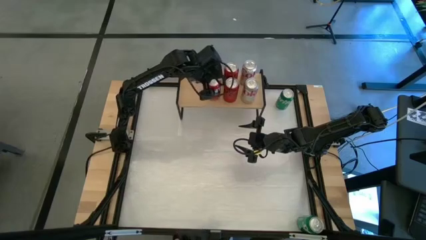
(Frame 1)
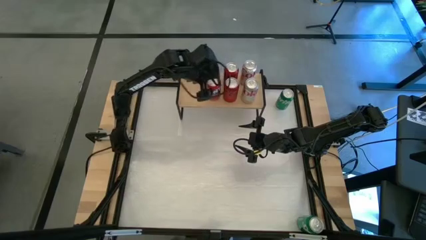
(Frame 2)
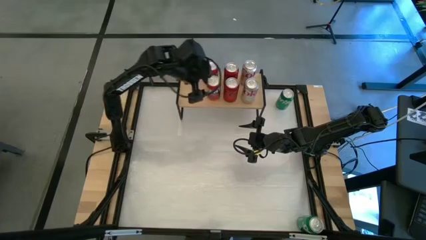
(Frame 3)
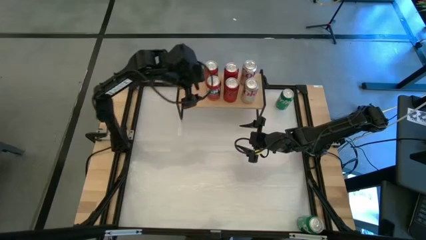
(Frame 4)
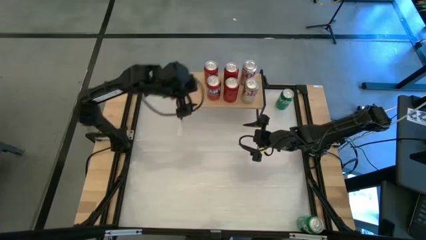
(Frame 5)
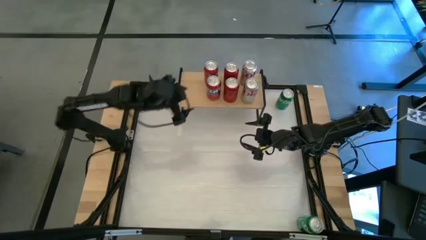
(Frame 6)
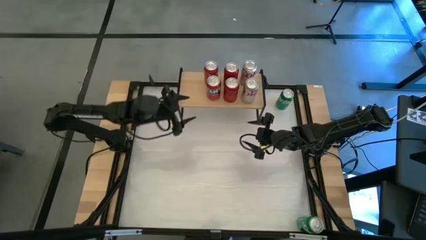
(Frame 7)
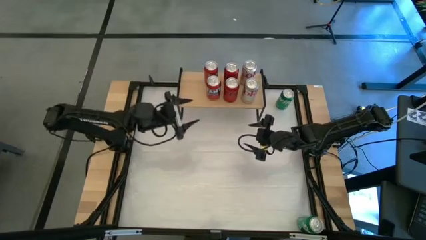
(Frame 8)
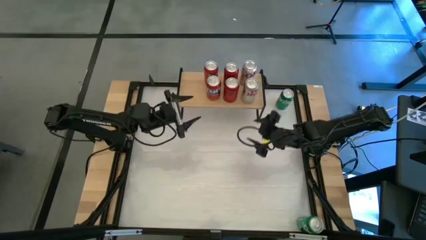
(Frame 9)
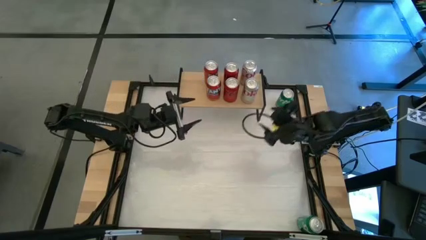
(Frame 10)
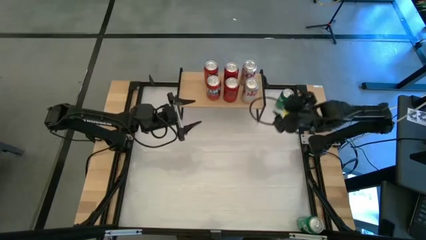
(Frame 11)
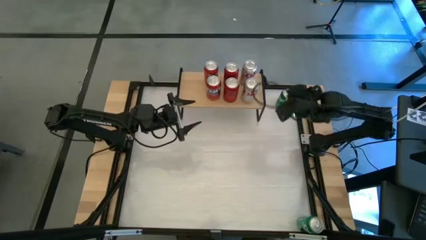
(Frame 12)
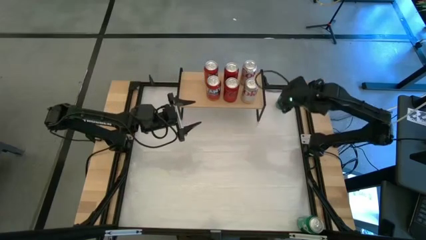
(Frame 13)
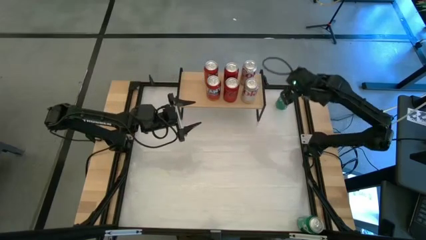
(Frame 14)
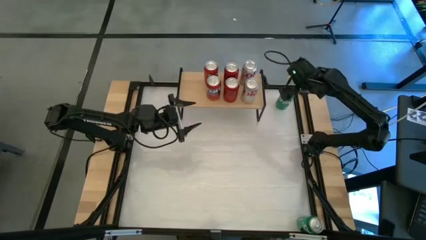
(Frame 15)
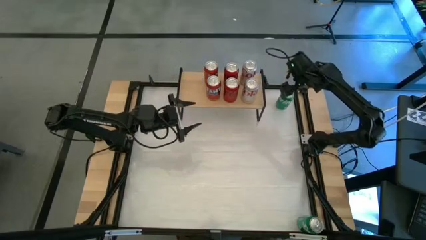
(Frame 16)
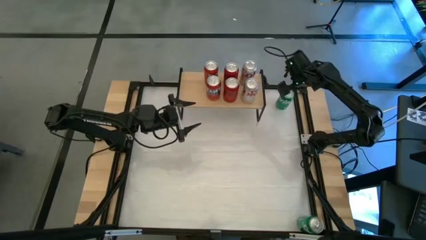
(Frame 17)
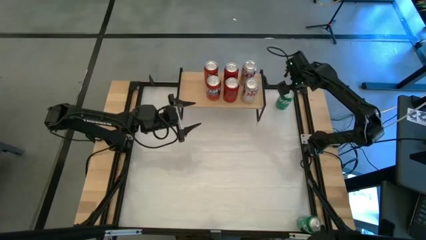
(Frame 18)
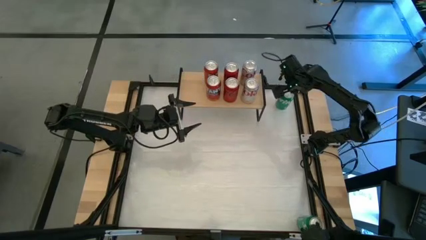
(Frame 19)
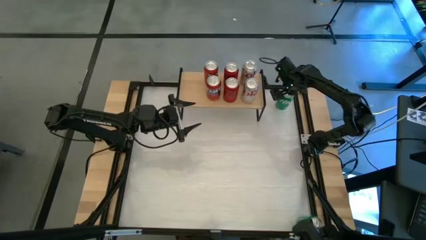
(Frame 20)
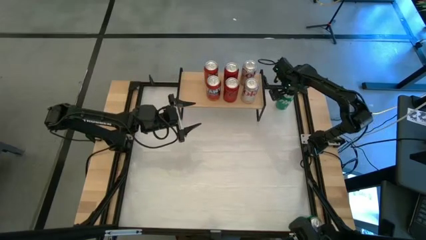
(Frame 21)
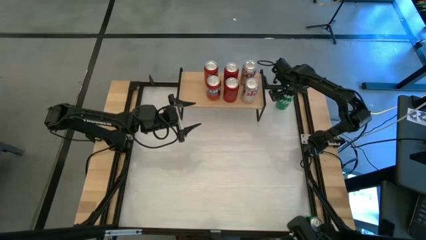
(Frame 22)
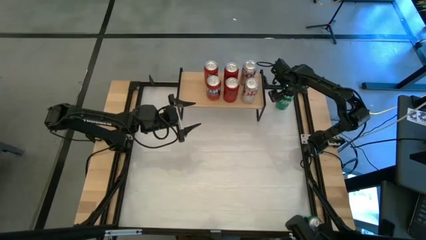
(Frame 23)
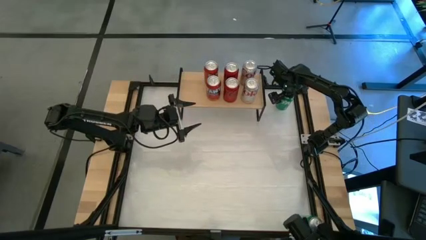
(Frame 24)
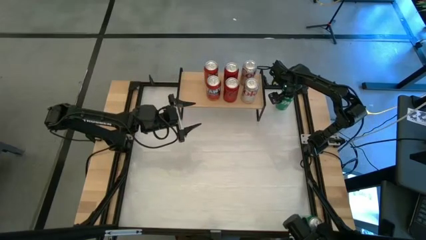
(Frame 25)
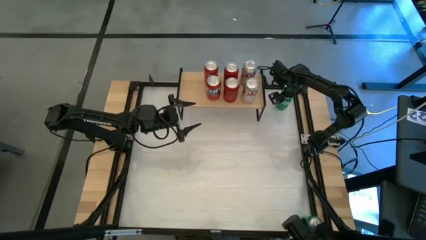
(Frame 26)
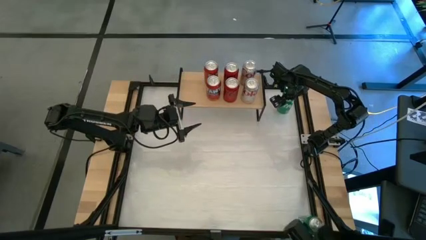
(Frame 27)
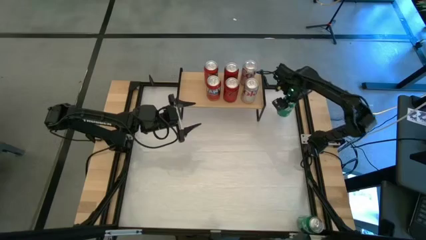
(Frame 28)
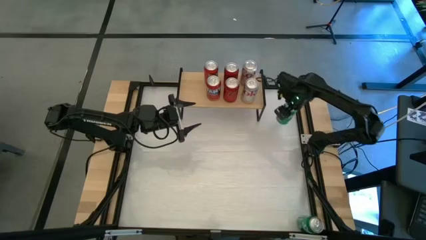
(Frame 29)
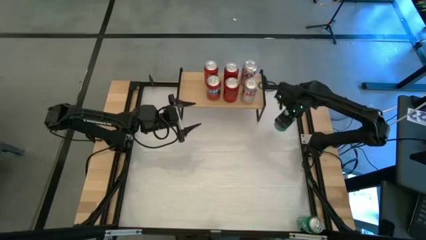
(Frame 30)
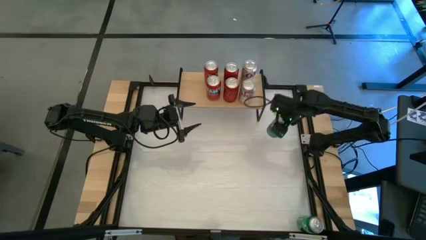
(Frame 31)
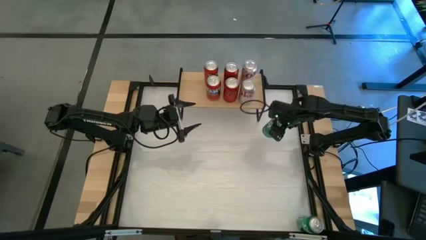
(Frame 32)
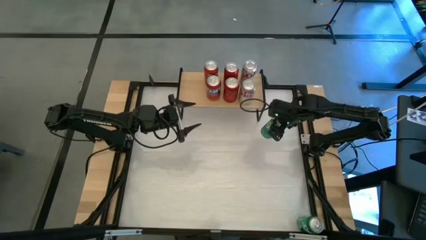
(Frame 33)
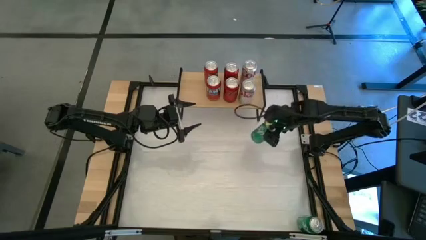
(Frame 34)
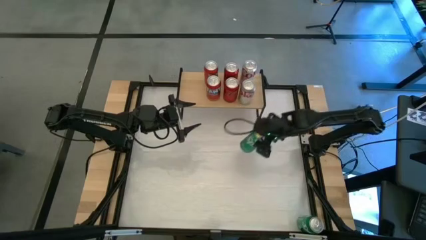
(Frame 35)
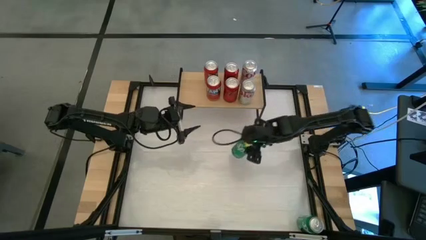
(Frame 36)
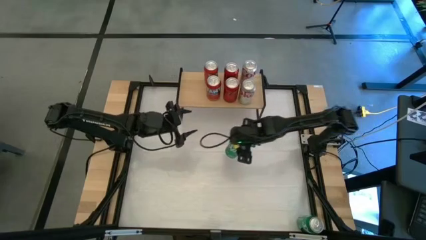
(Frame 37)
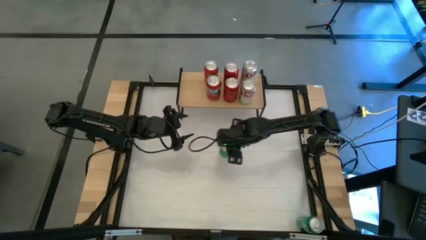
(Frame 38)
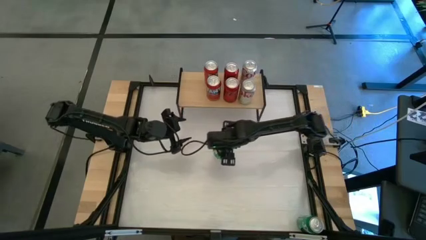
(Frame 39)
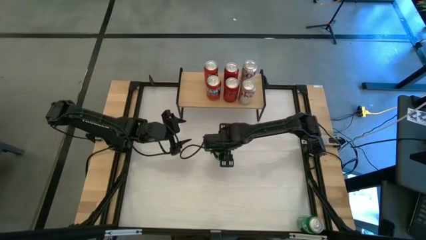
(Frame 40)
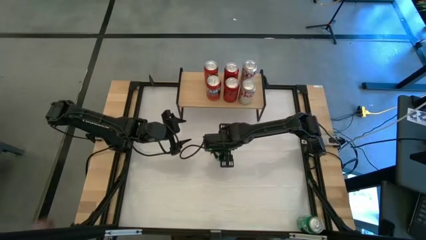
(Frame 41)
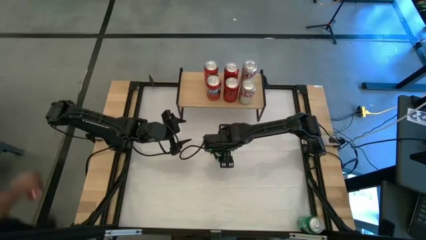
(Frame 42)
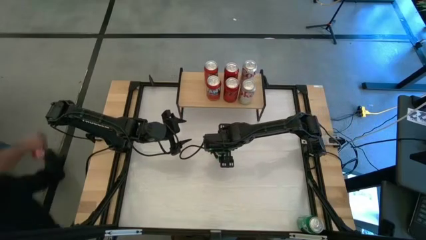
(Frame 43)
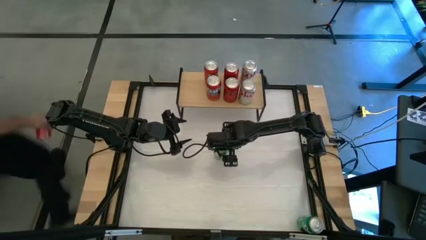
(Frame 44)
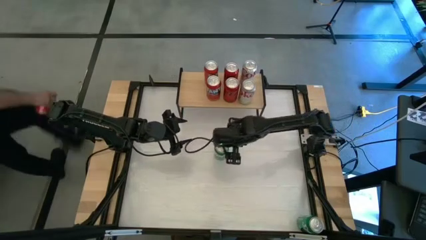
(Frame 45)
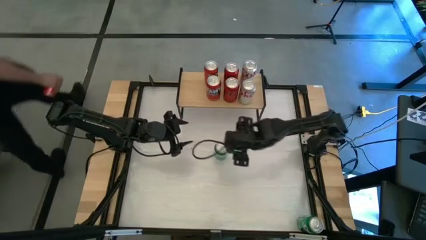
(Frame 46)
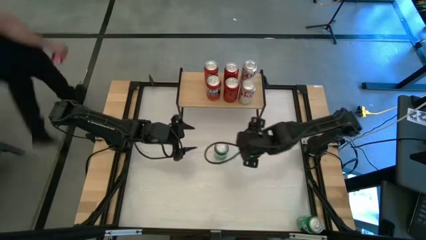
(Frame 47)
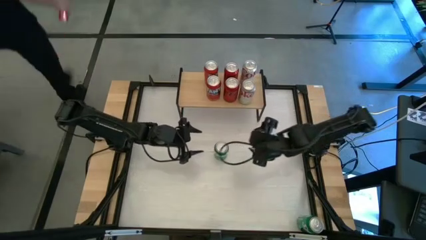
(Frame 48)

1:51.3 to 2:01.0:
Task: Place canned beverage on shelf
Put the top green soda can on the shelf

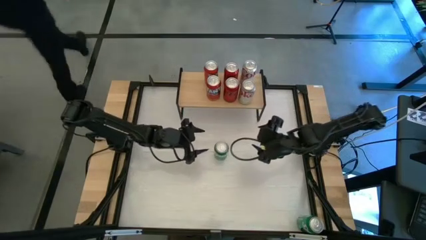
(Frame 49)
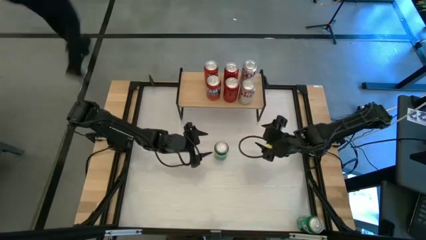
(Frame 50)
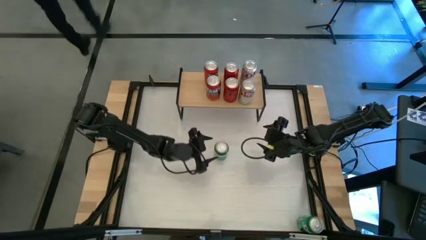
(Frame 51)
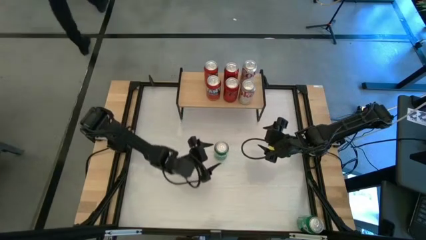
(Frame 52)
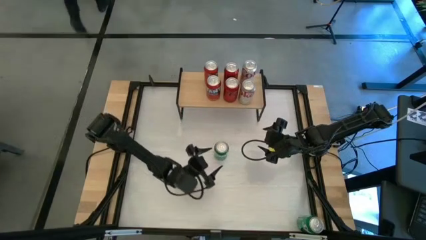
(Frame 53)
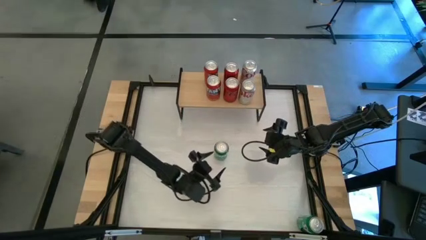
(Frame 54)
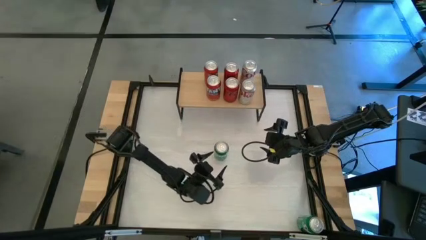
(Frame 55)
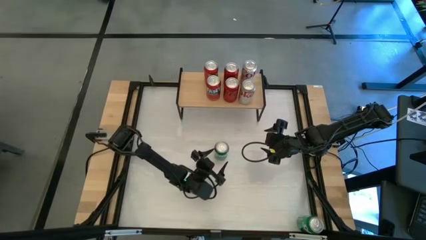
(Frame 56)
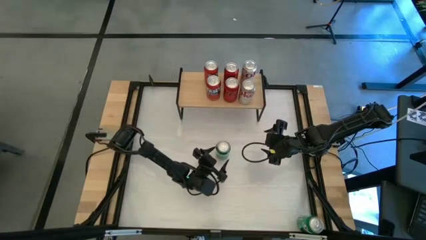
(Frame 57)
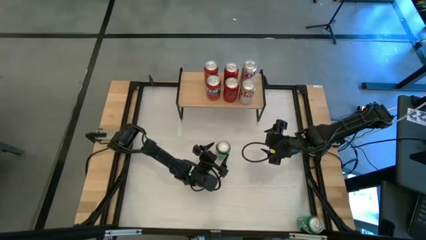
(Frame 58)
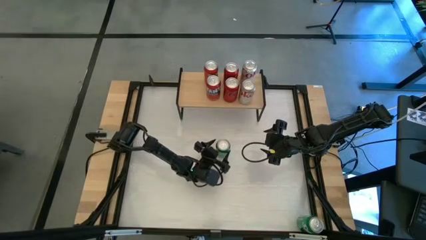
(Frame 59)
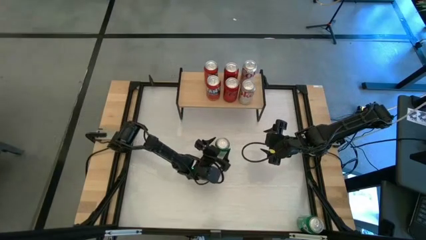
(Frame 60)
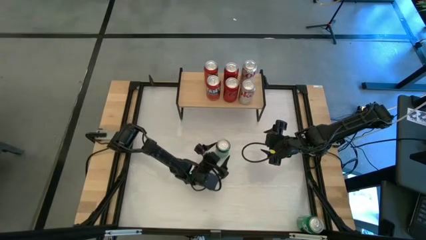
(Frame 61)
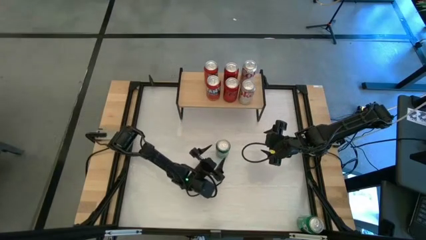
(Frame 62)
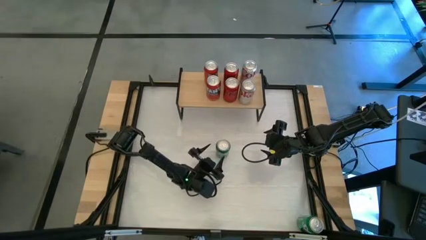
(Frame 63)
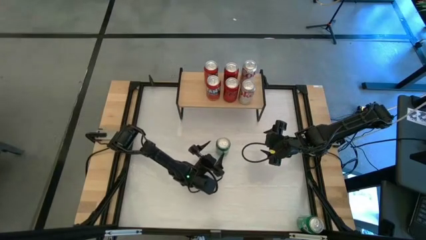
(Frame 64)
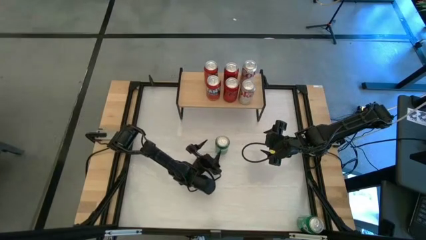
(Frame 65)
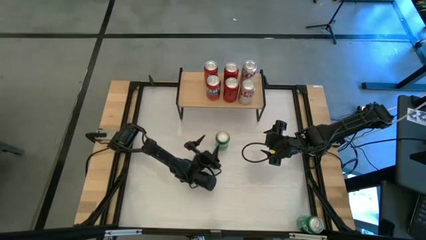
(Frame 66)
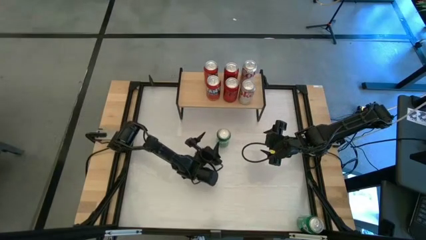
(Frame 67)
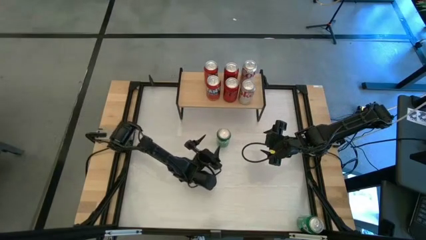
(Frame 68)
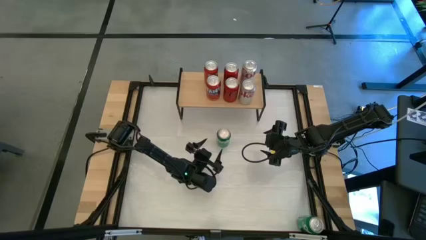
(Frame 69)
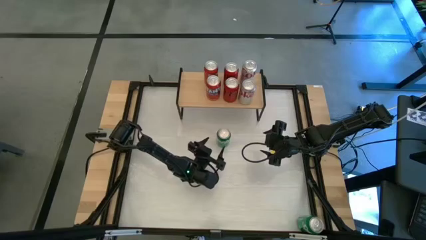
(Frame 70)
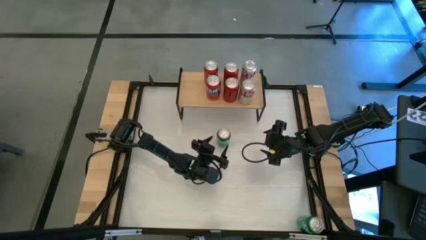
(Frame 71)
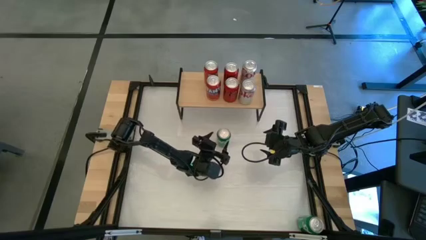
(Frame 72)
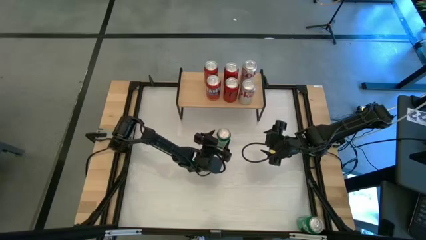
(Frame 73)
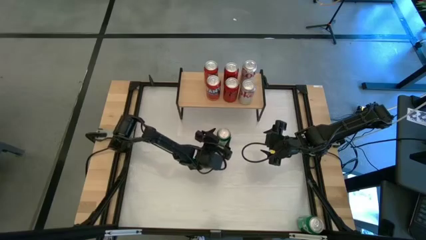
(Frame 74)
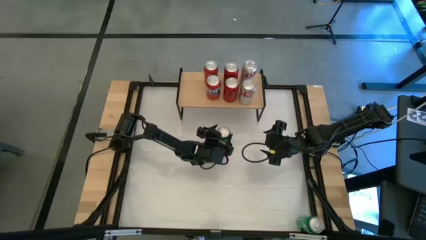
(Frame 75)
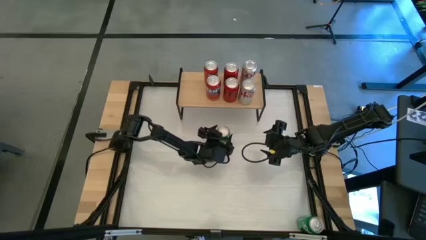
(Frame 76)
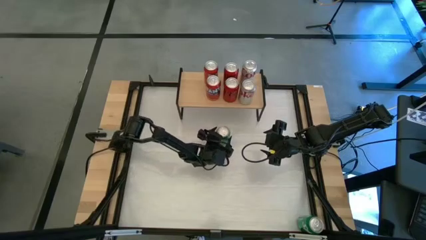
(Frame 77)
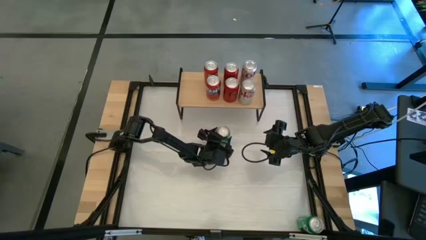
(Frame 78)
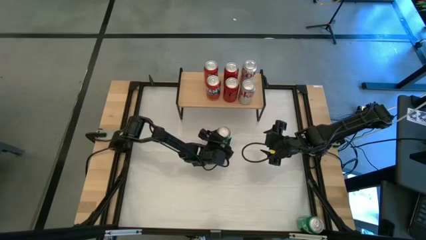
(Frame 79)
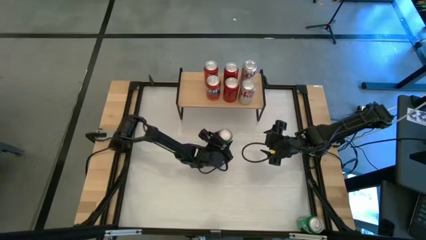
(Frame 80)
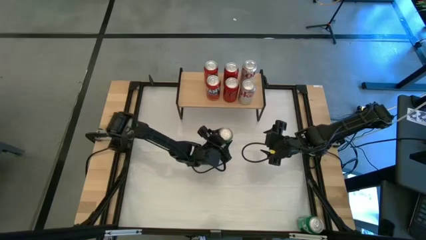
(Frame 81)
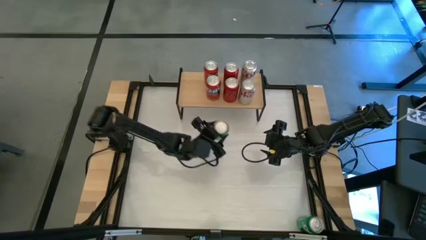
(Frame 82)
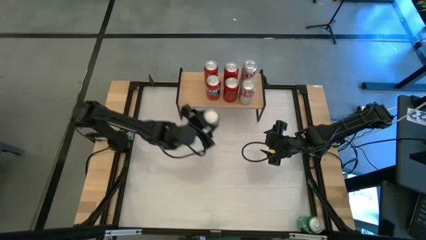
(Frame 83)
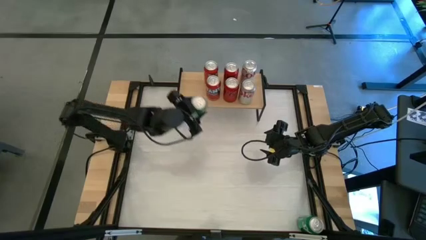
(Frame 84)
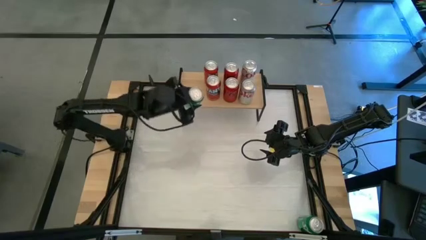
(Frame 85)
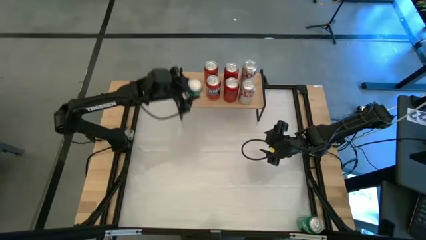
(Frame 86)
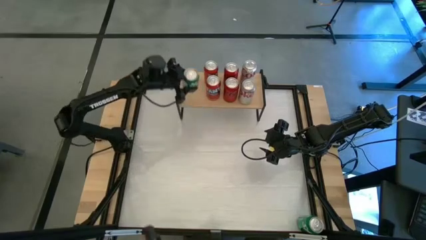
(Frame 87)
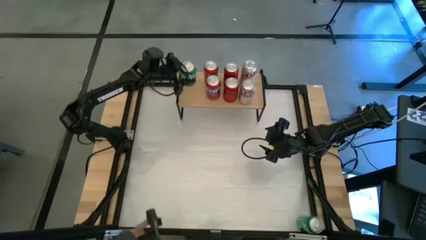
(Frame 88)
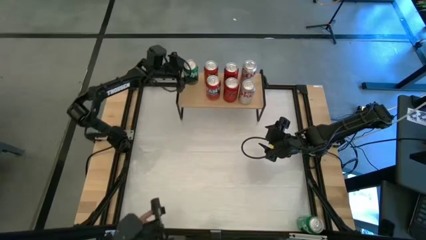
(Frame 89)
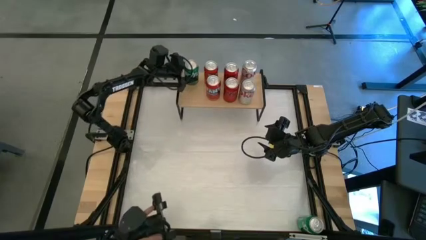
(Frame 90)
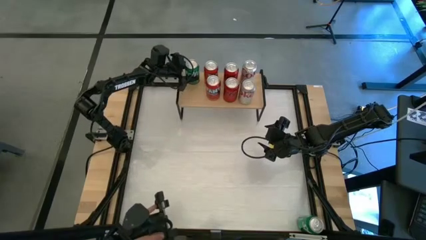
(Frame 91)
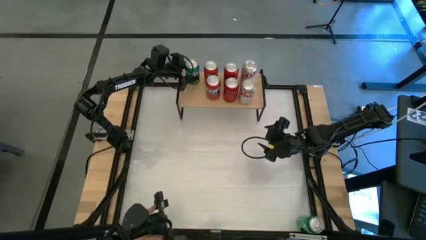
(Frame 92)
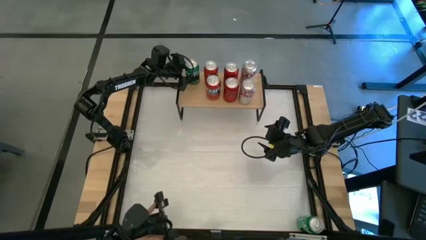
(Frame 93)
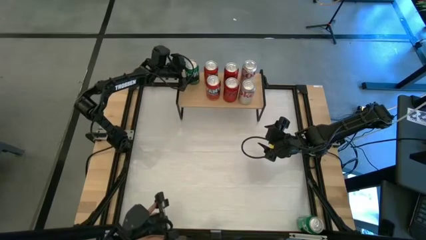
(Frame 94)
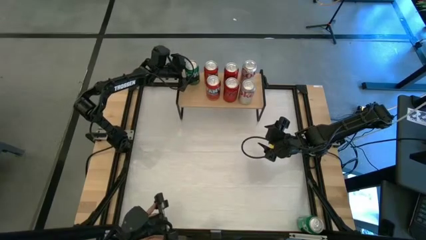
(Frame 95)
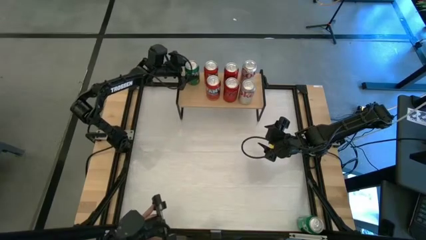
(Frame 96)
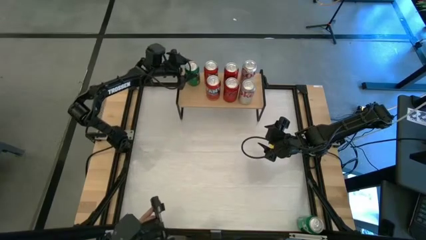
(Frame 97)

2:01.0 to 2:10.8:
Put the top green soda can on the shelf
